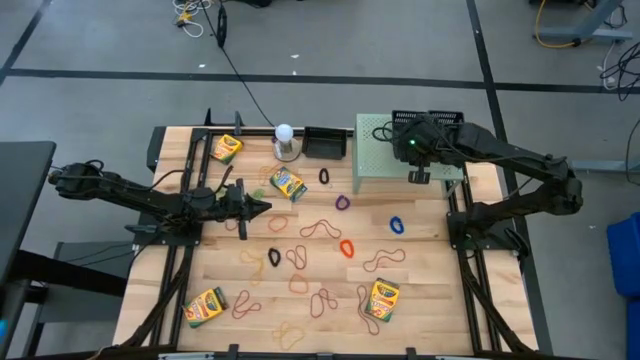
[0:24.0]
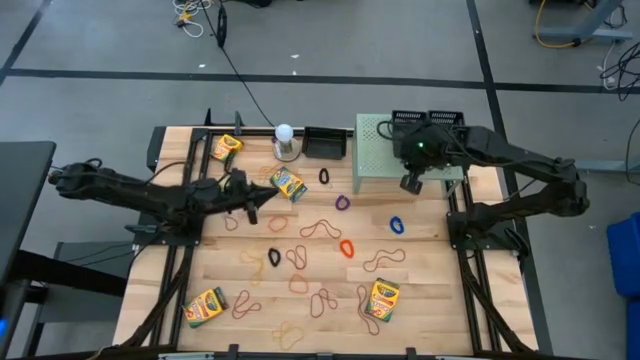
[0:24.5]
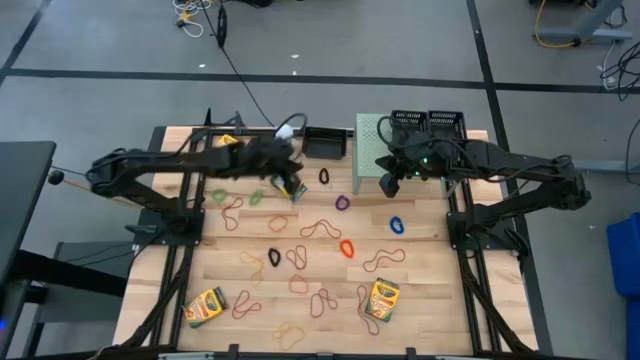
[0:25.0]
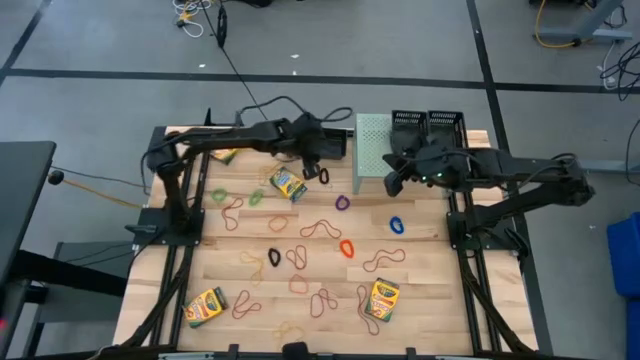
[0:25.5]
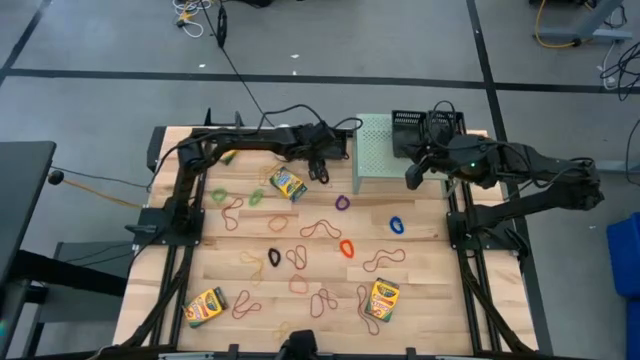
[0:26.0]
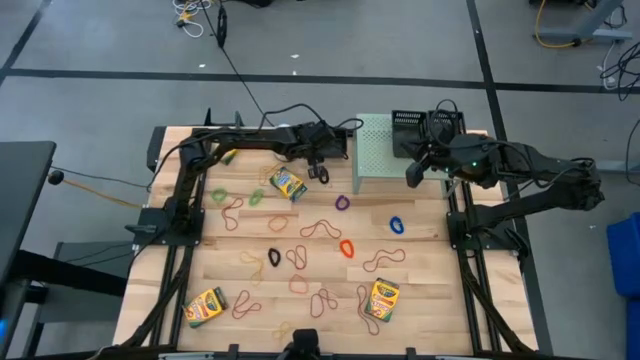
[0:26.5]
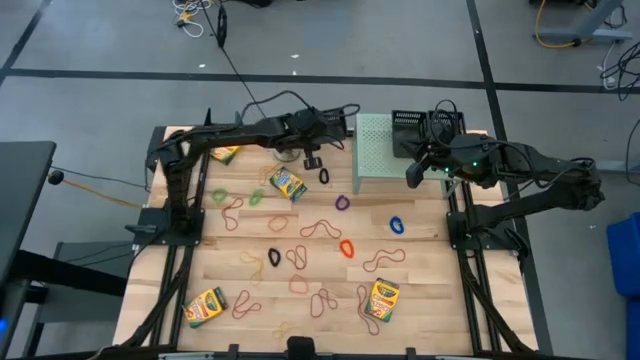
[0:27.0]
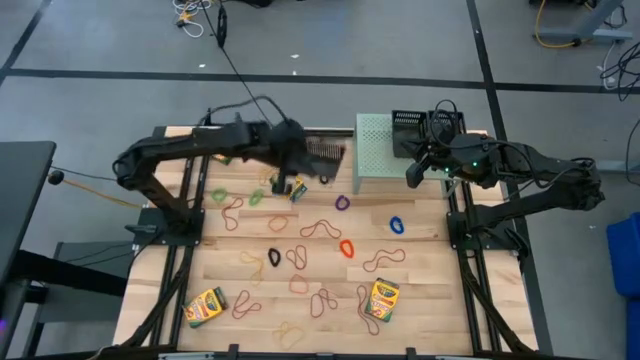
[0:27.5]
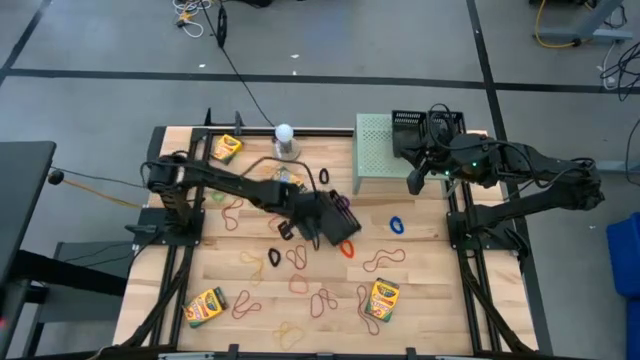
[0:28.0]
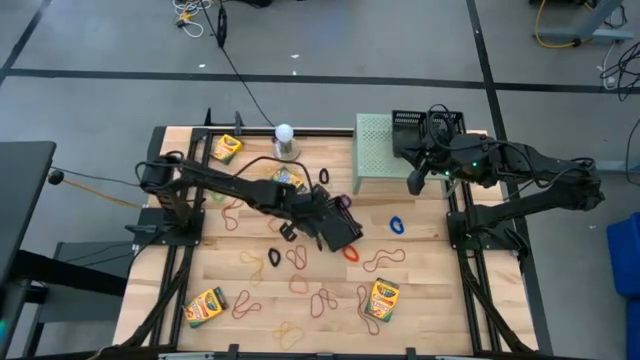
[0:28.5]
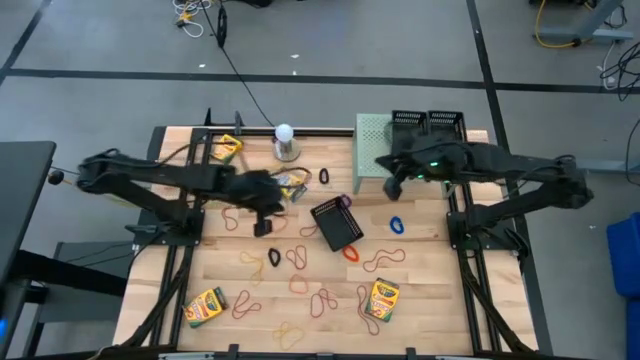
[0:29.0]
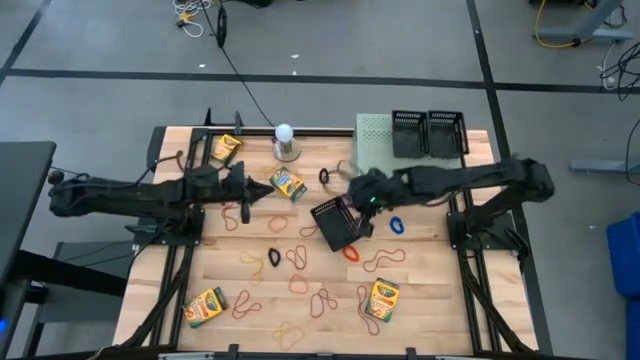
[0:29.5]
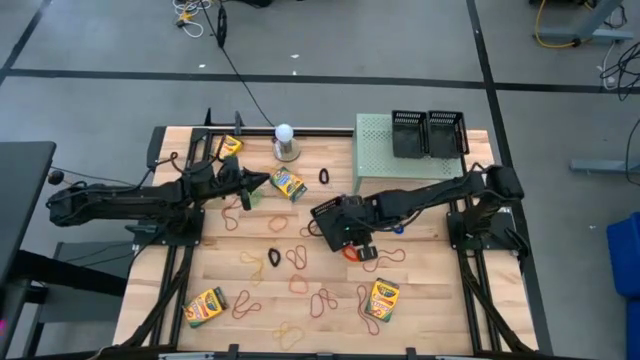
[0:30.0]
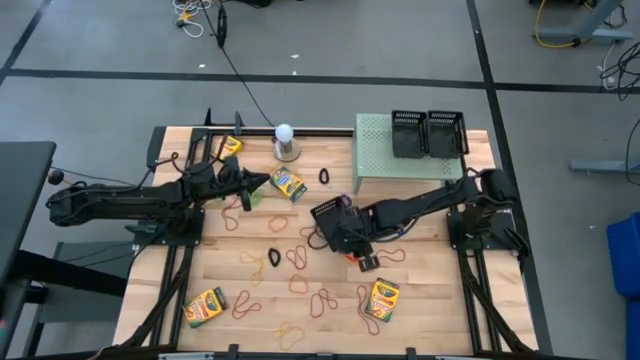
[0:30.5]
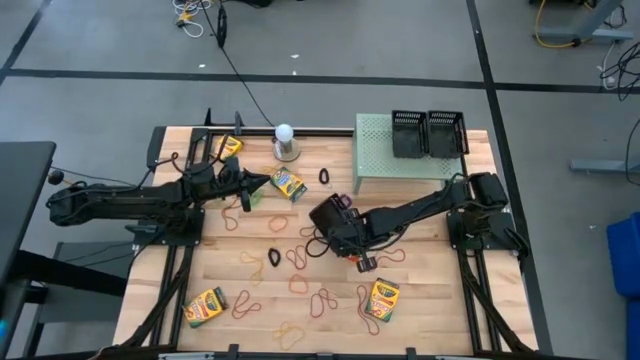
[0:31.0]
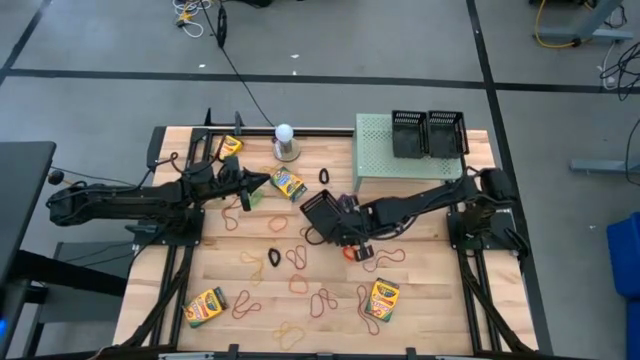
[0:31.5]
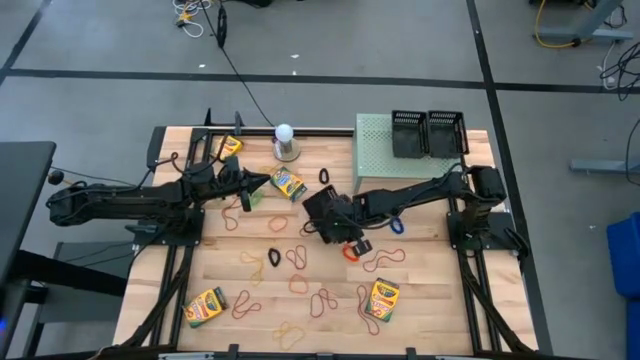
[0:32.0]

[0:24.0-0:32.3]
Task: Pick & Place Office Desk Supplies
Put the basket on the shelf

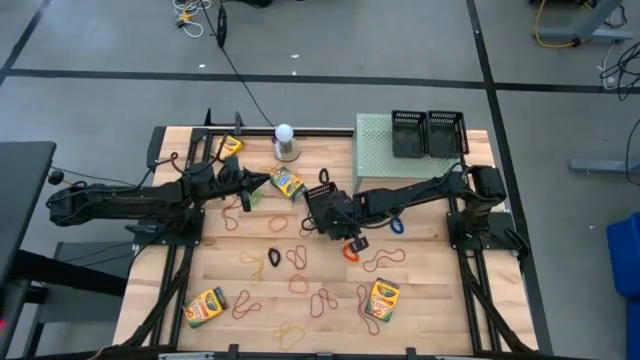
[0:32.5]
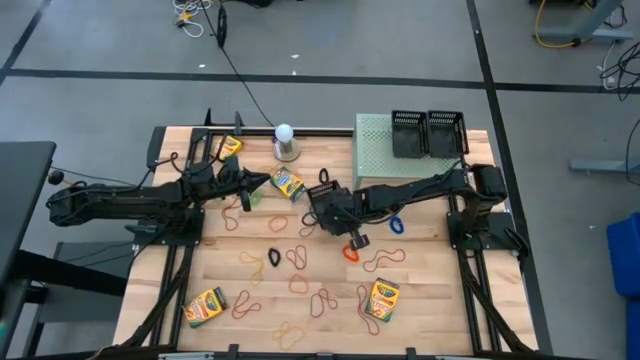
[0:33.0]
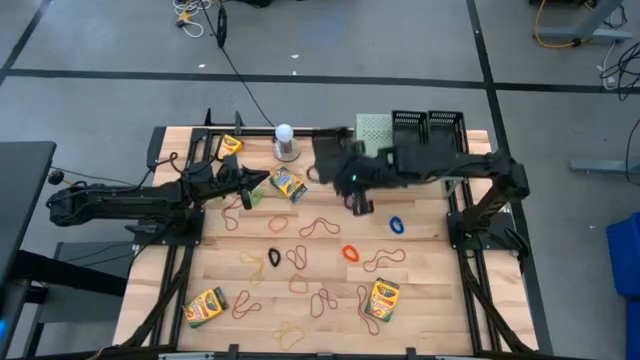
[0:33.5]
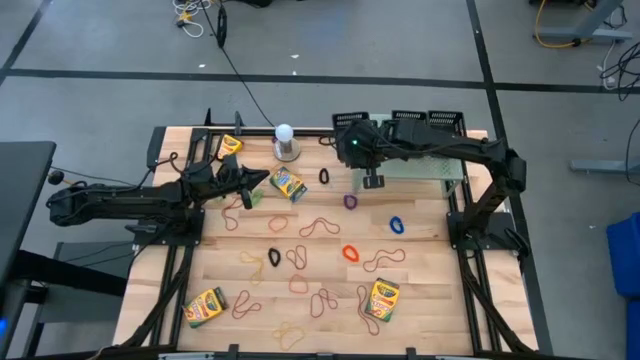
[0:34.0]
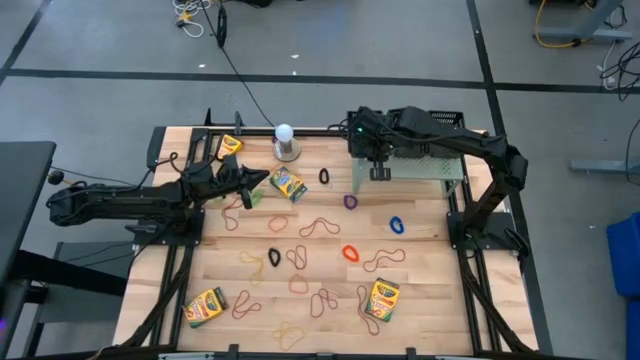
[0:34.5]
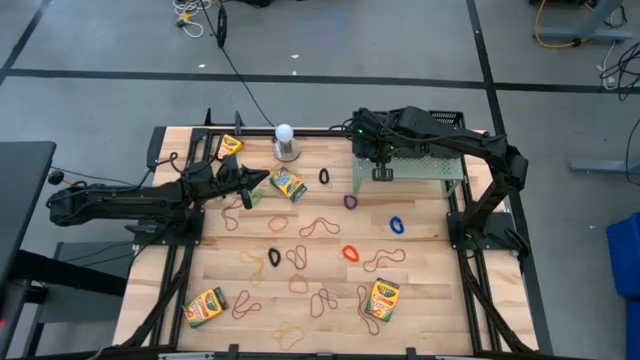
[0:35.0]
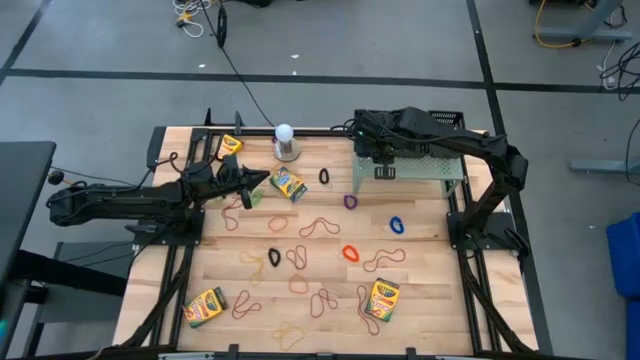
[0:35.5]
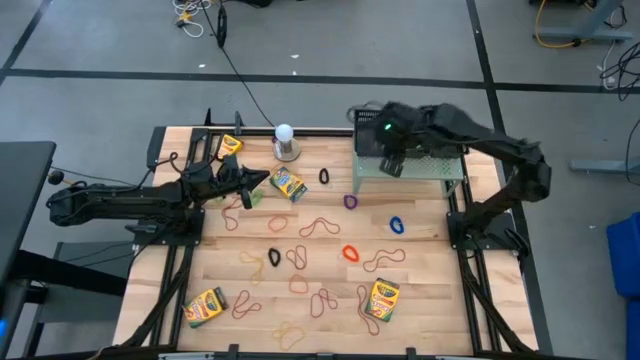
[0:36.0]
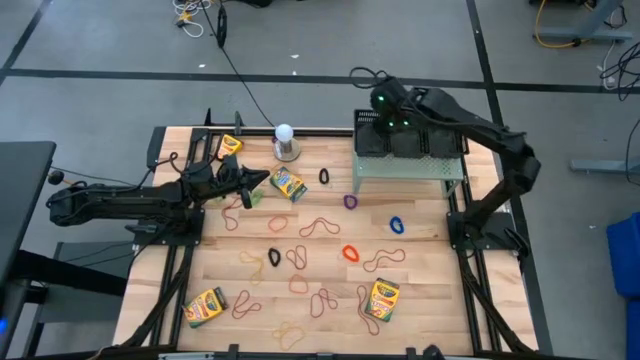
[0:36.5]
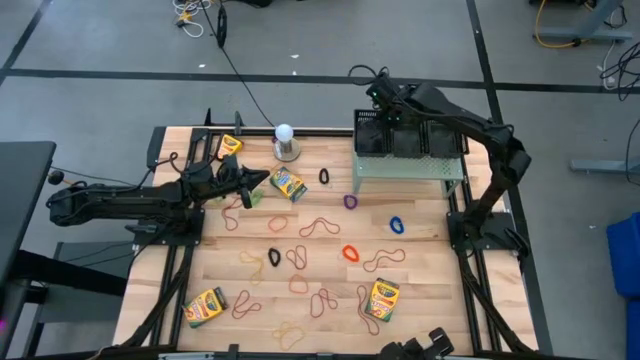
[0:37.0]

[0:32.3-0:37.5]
Put the basket on the shelf

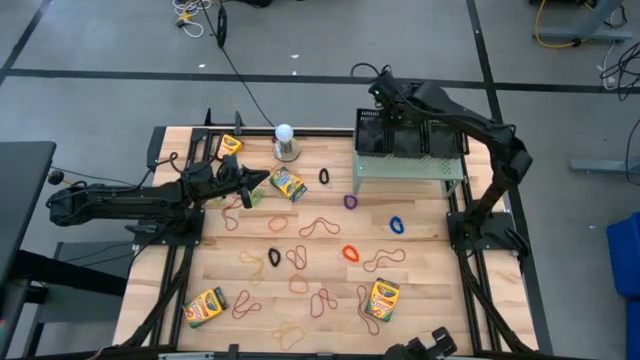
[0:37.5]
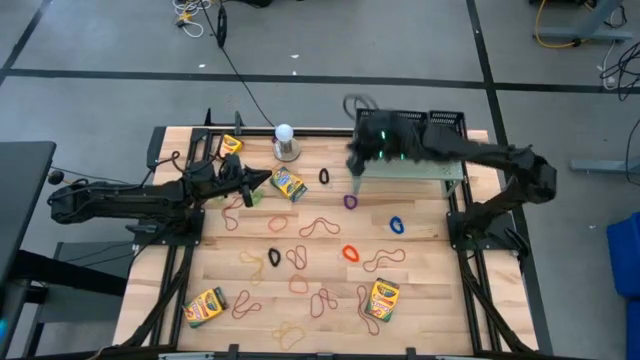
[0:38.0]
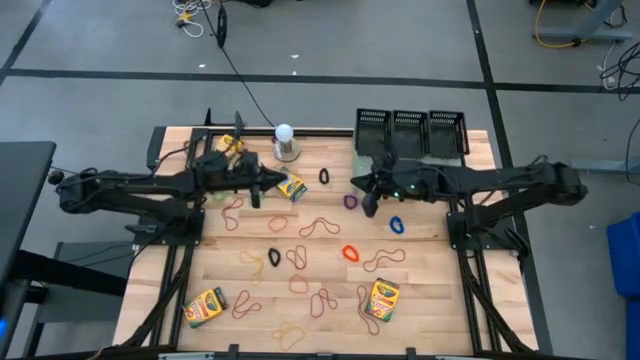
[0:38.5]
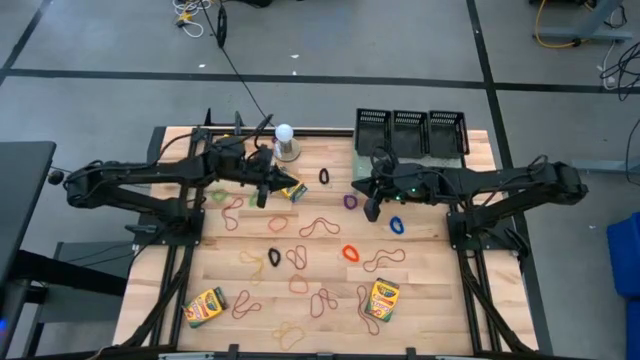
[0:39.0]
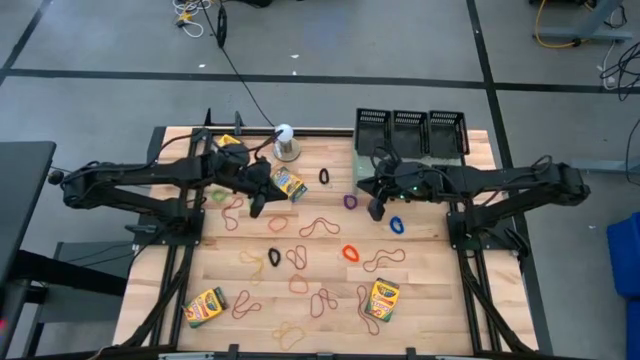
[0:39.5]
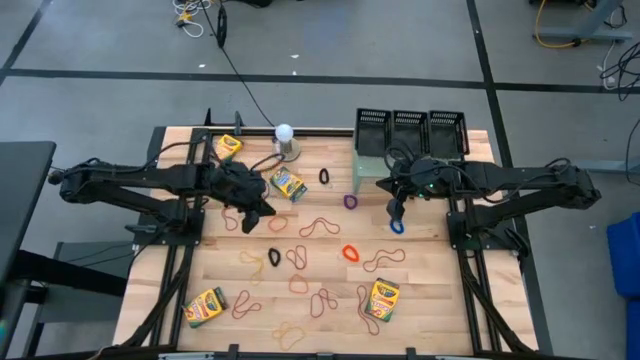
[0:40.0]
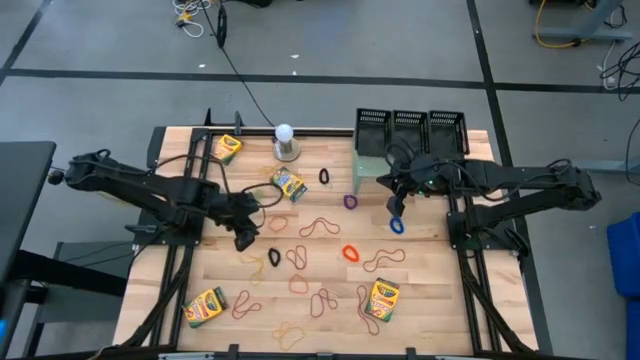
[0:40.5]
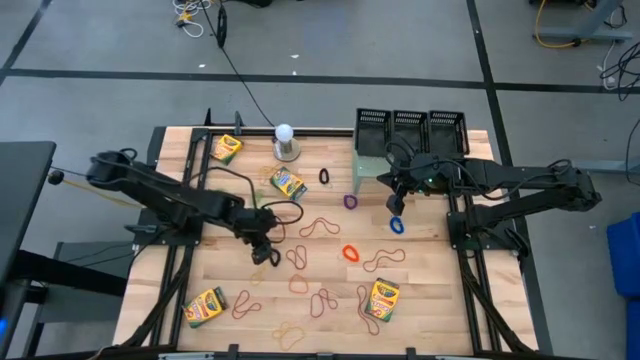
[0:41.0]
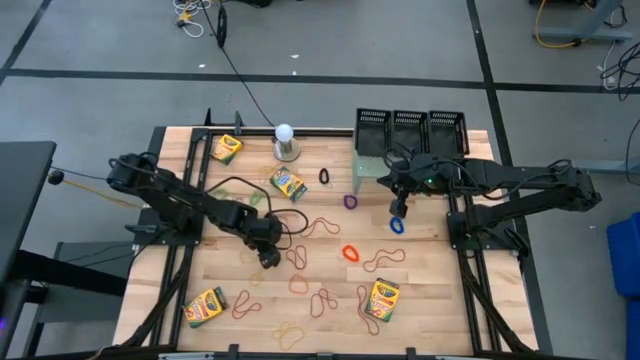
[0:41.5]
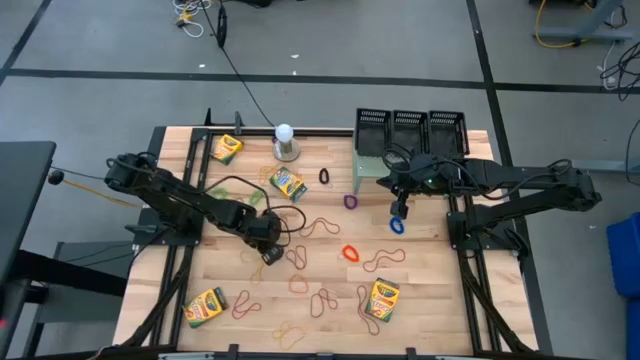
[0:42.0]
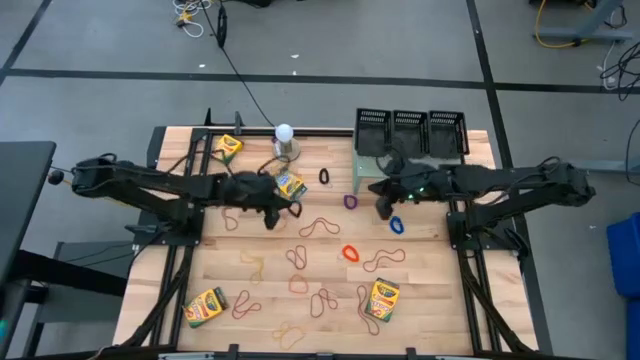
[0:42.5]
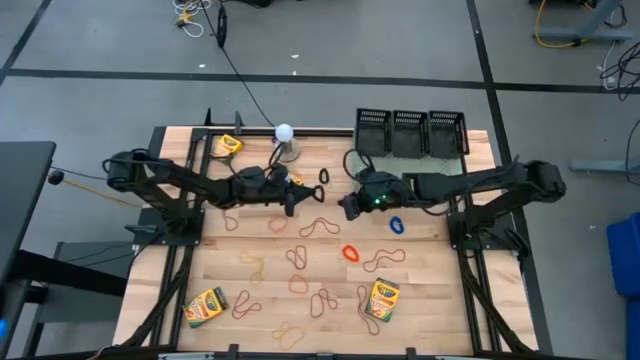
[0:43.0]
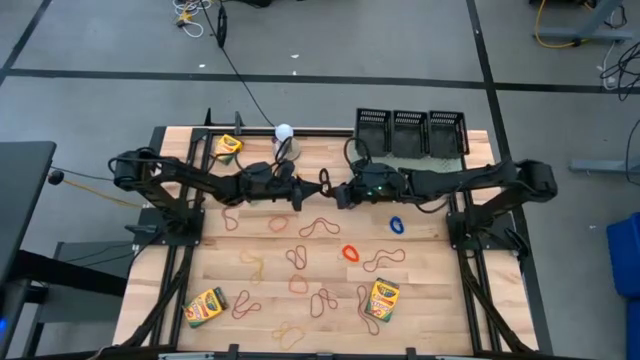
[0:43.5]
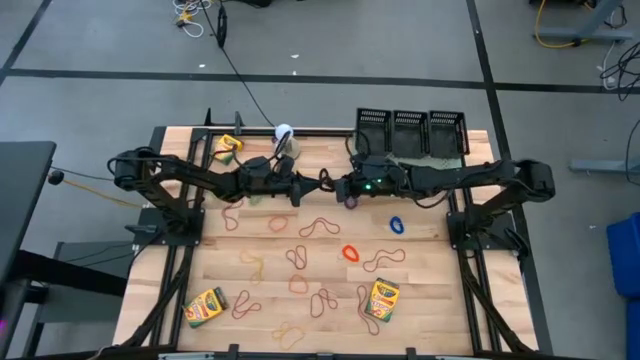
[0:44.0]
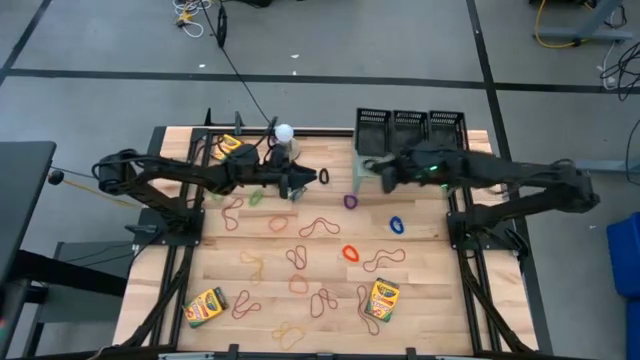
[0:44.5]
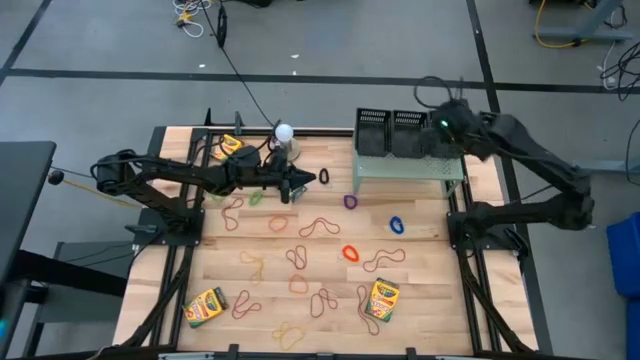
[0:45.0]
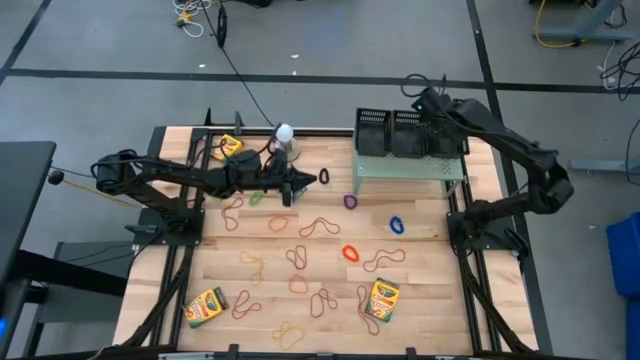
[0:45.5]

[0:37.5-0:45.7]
Put the bottom black spring keychain into the right basket on the shelf
